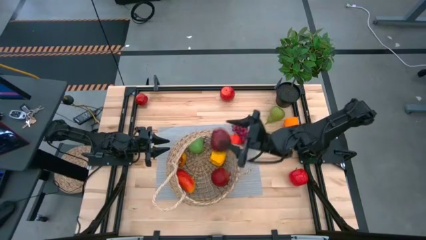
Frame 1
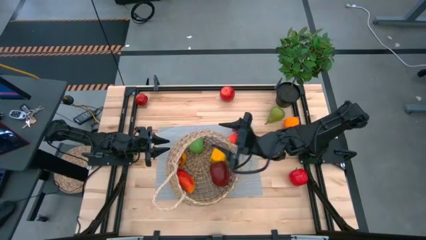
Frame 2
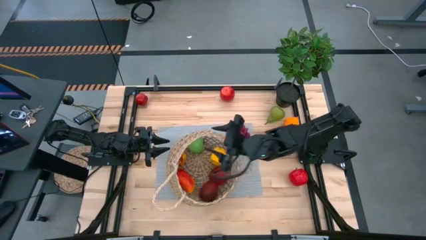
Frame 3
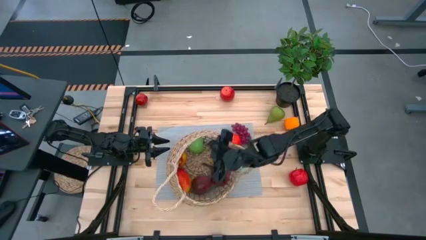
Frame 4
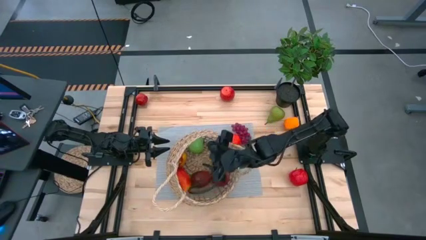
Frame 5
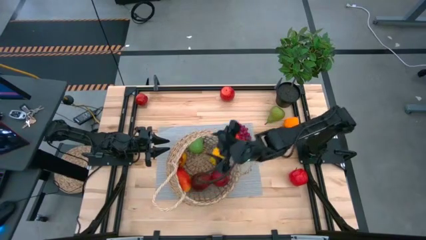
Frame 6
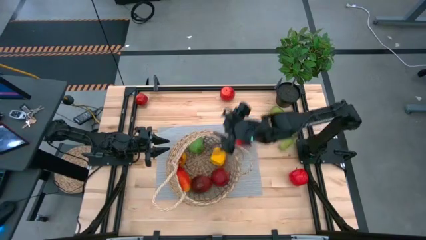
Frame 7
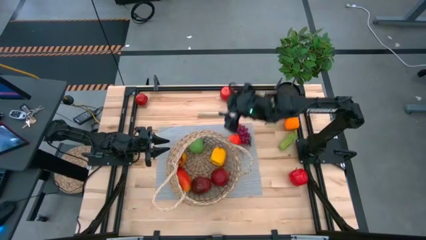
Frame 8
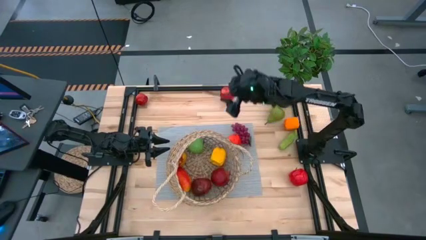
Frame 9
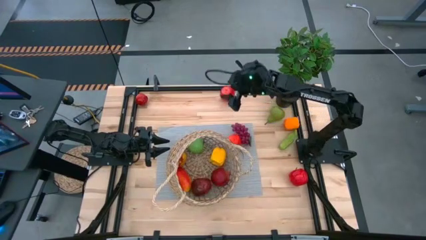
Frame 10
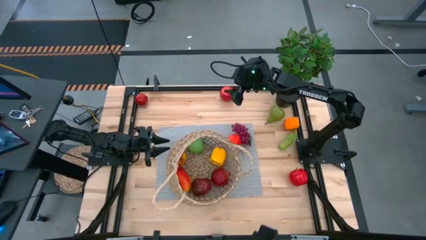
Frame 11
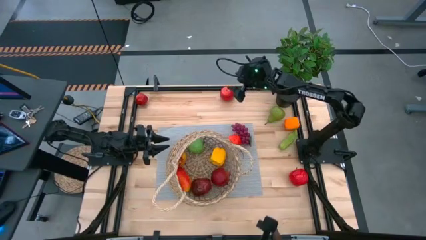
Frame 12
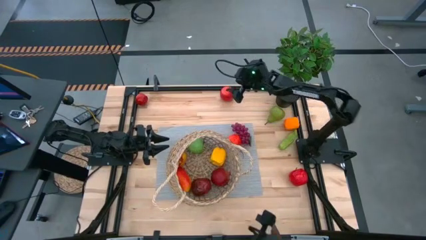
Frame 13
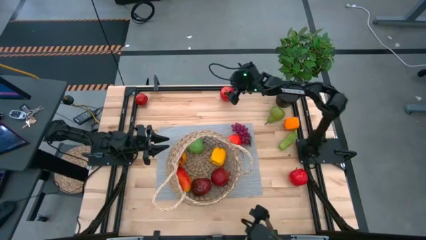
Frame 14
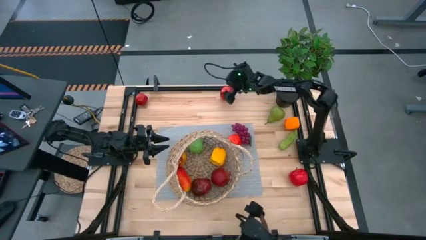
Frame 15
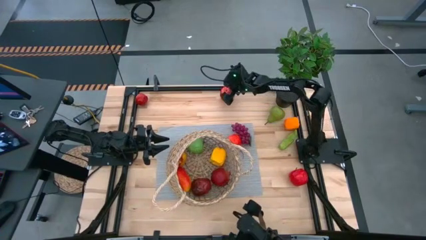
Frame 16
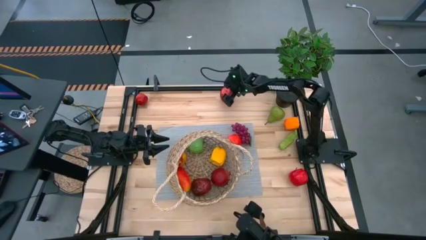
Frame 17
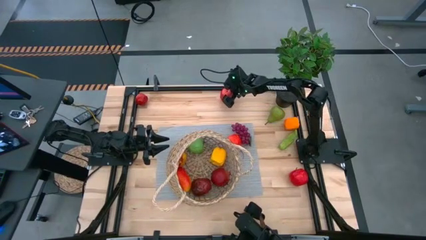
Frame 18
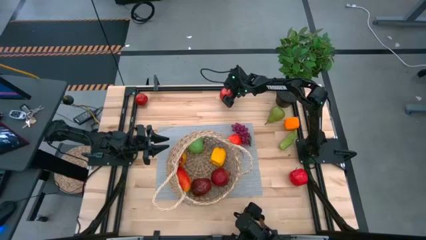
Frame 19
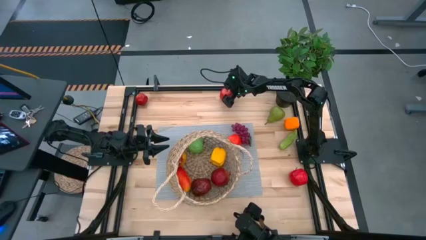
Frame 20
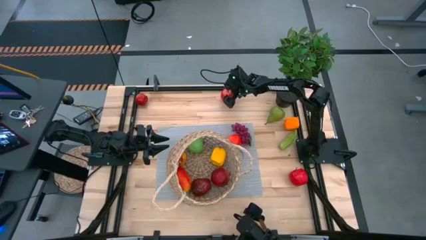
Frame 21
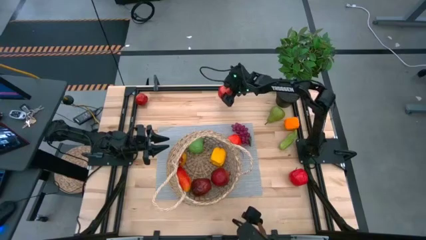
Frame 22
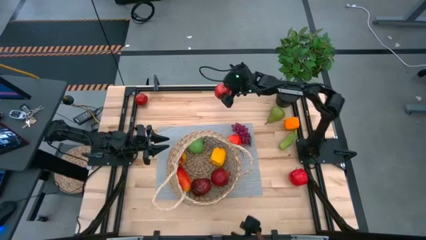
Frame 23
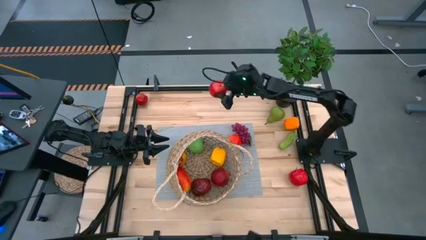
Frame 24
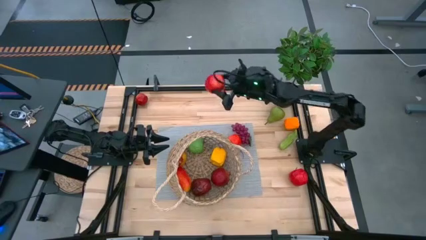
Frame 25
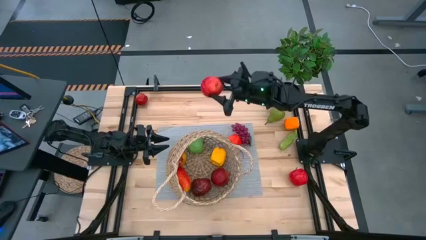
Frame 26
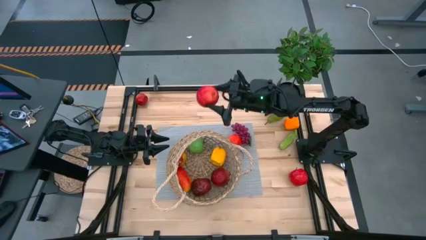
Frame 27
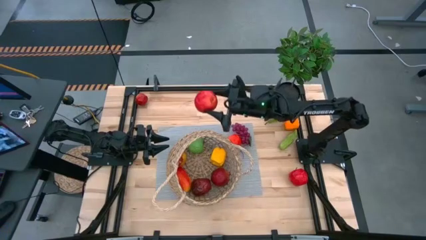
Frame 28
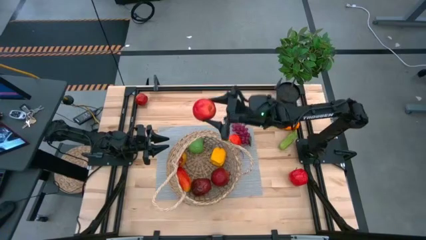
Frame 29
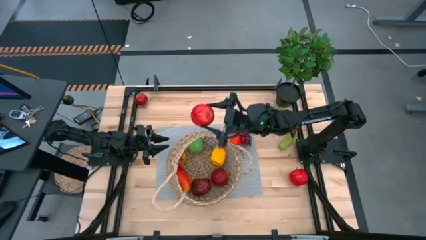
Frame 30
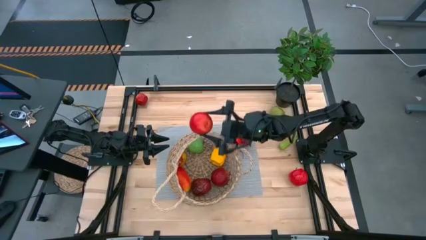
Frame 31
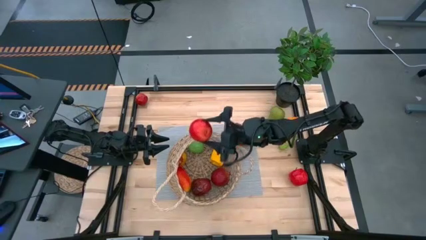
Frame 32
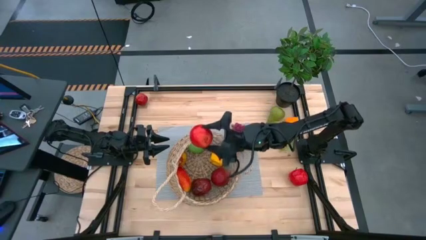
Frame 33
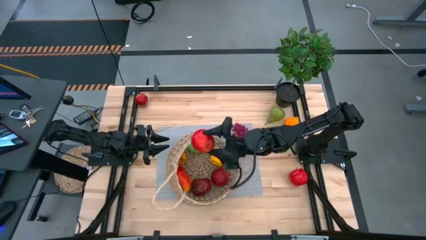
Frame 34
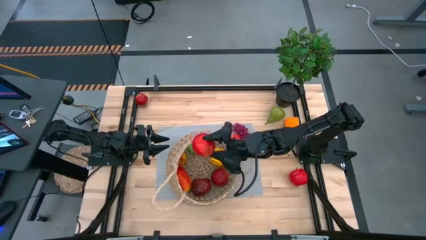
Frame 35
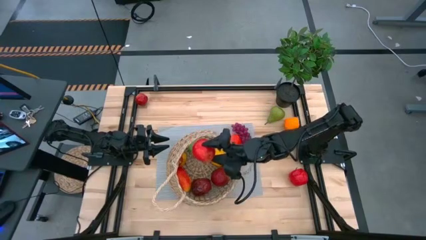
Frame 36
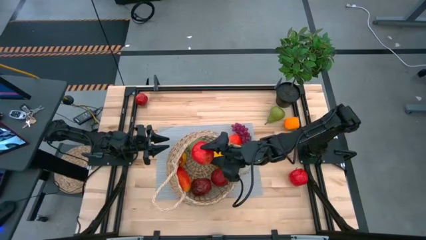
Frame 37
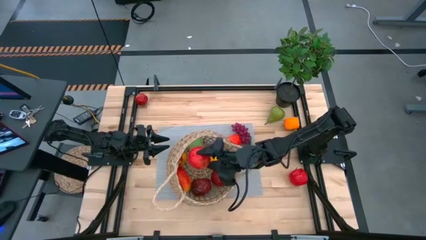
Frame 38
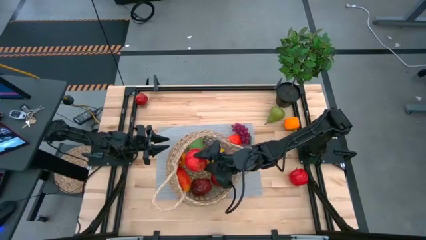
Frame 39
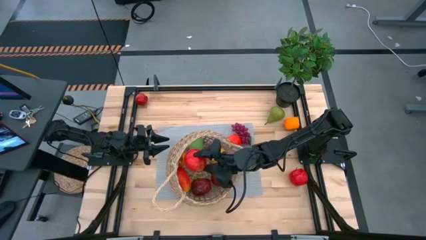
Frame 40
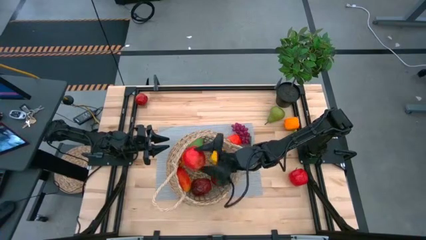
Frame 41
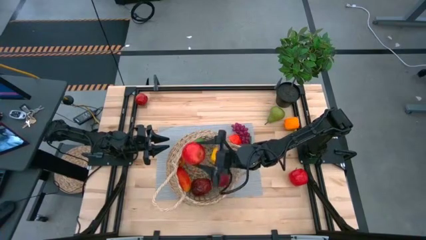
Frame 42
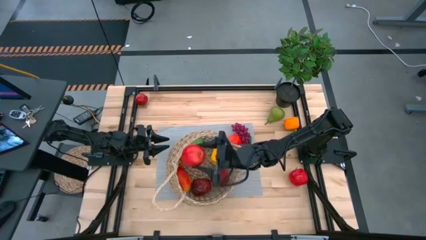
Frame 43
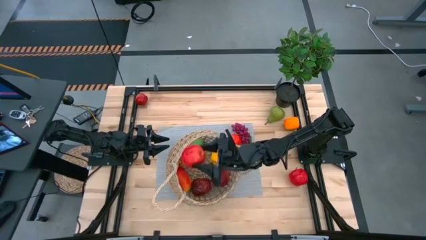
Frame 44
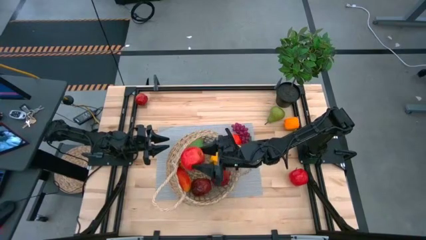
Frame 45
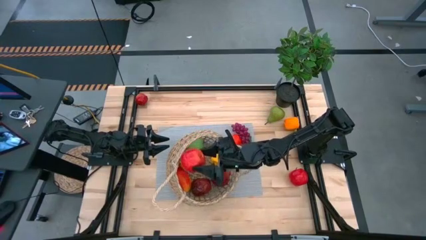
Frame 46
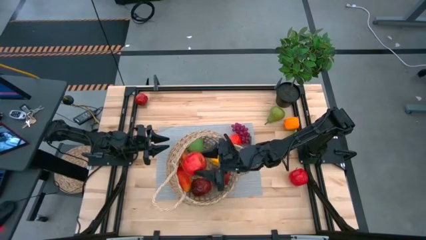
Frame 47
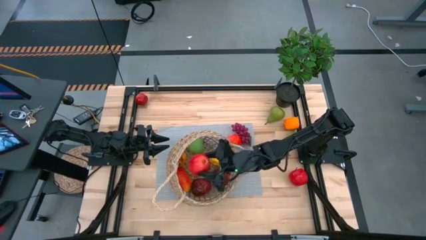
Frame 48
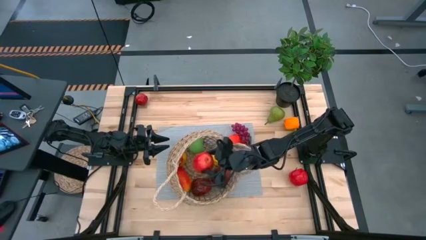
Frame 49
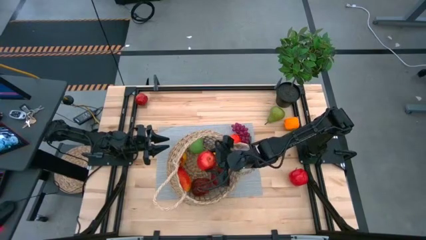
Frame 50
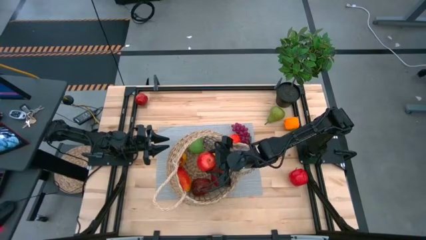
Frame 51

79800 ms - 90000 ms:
Task: Build produce basket
Put the red apple into the brown basket

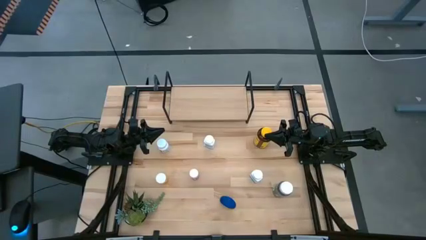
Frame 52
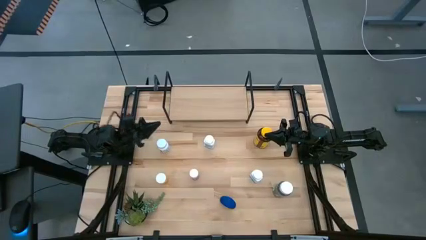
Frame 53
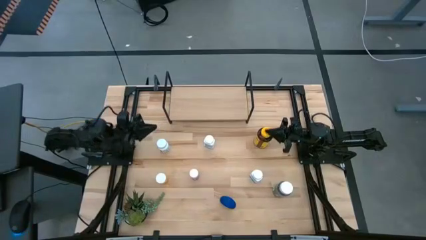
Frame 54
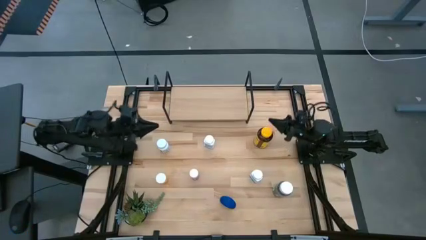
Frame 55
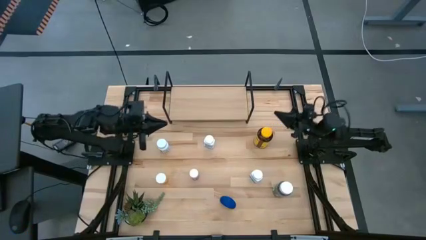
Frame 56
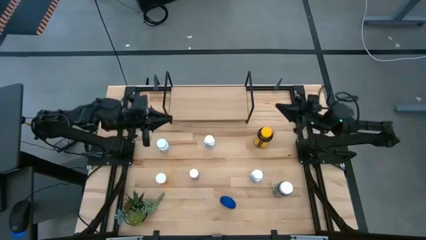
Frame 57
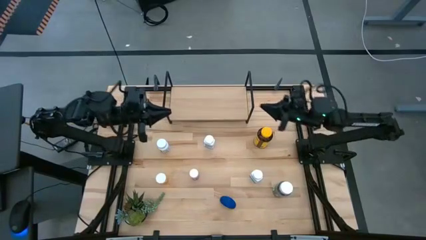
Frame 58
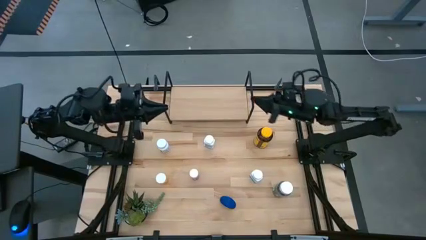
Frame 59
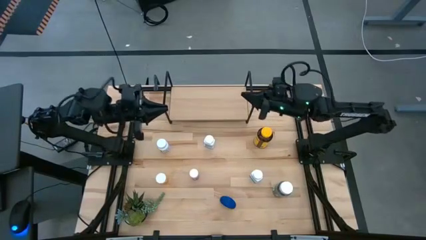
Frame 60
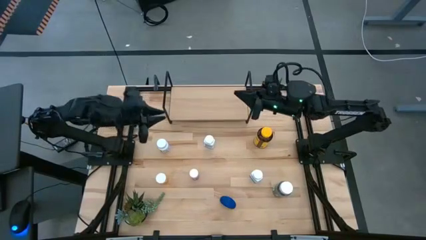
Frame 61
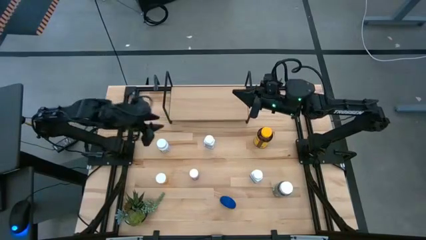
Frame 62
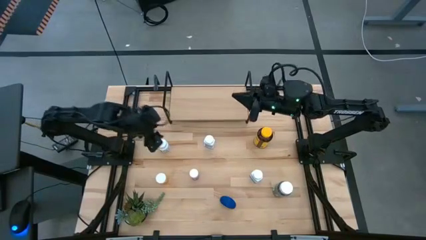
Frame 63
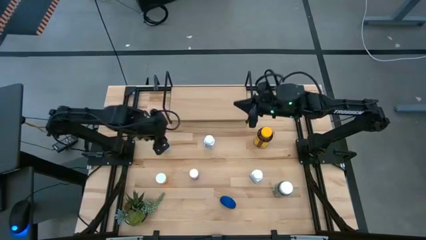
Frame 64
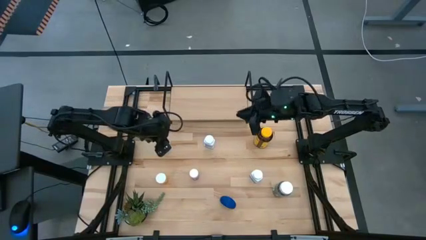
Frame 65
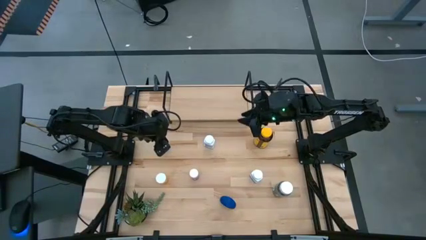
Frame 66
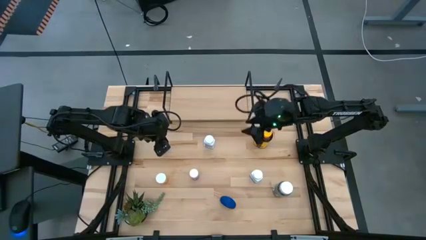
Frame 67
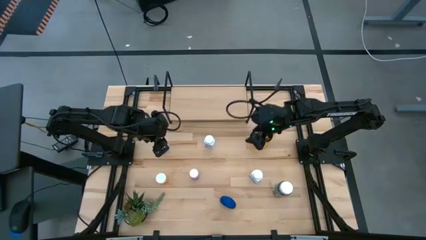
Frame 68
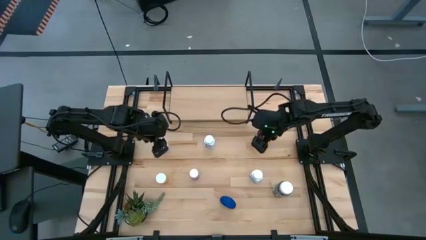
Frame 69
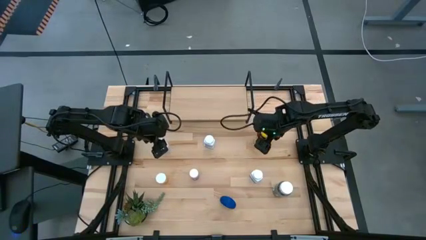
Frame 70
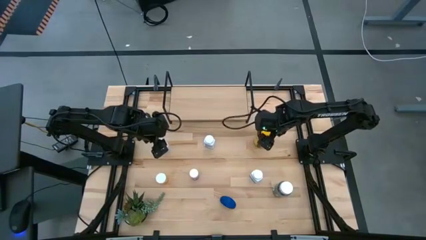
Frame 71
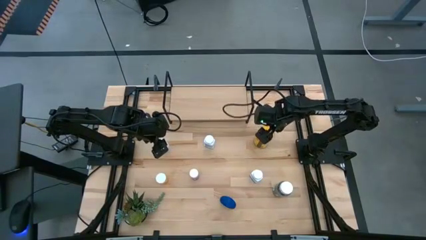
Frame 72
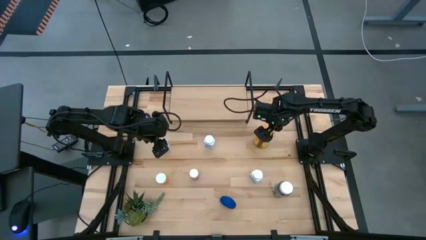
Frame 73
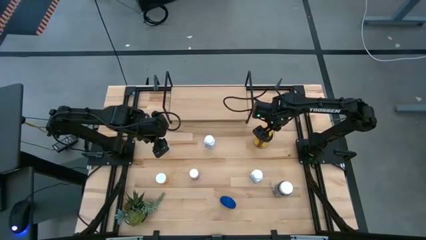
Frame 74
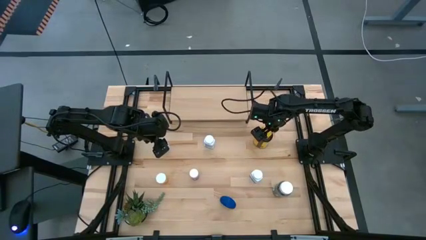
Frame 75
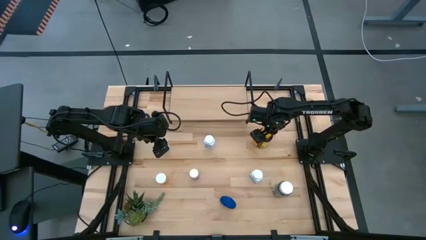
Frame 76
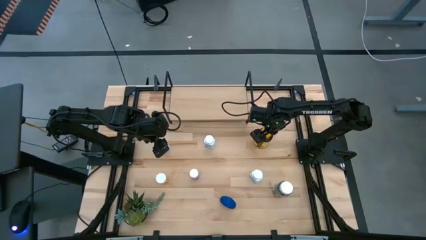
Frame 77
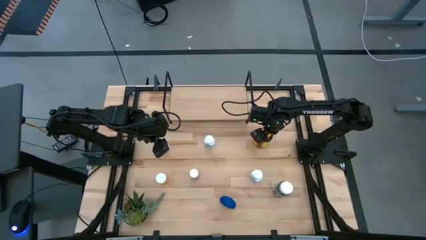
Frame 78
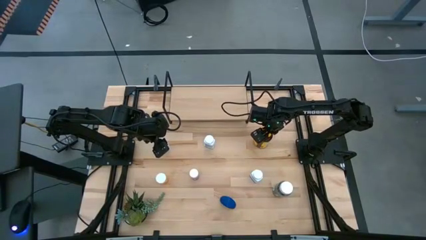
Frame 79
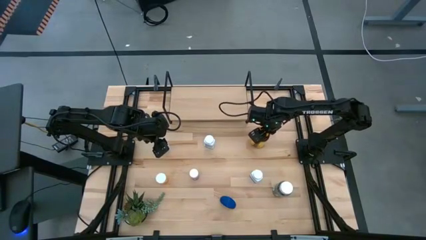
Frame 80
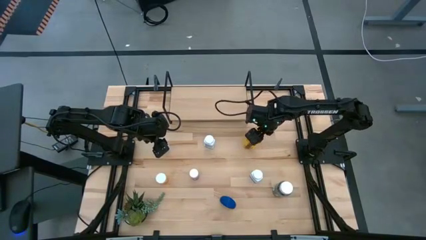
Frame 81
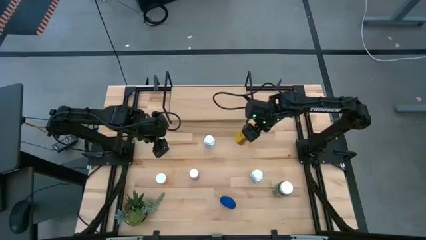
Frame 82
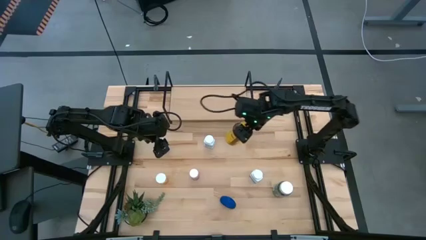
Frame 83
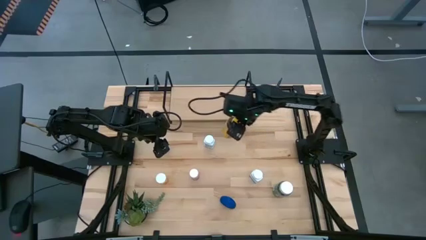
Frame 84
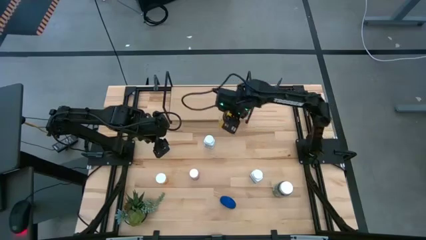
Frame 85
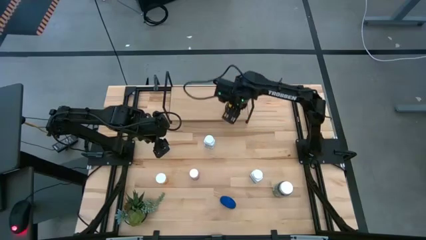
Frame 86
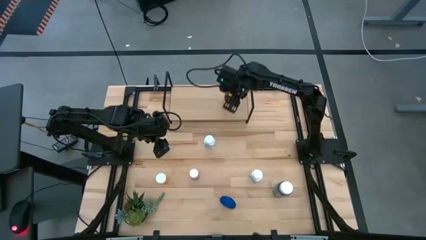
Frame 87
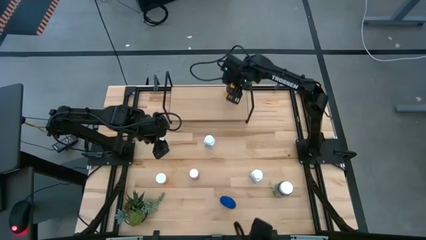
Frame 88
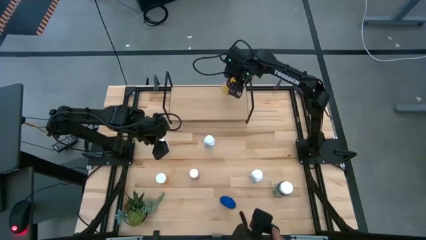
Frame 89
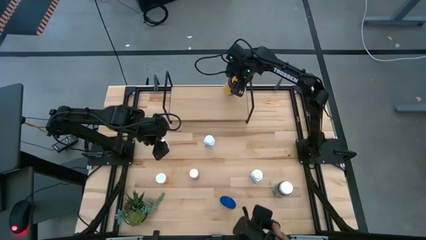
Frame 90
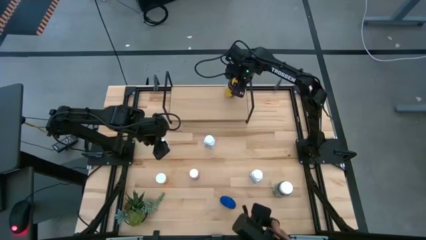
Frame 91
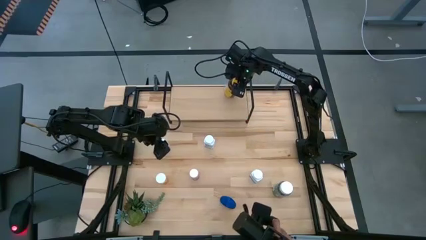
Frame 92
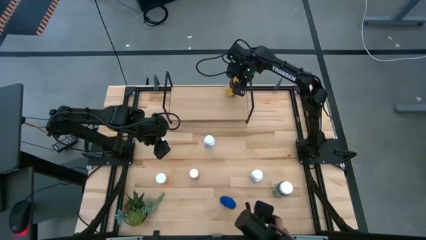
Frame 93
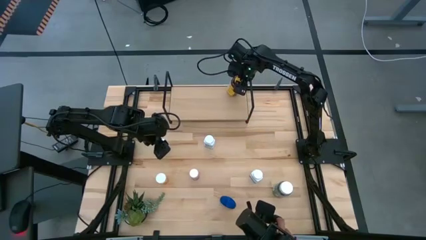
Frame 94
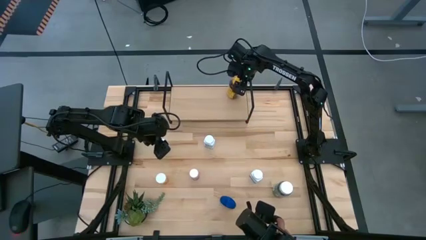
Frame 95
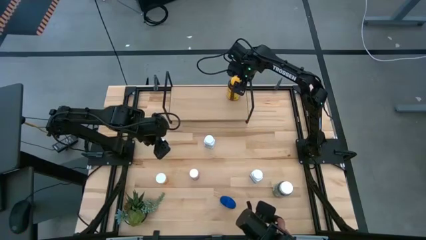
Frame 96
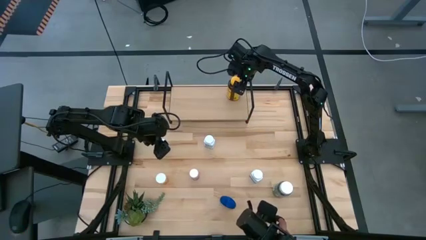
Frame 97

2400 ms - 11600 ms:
Task: Pick and place medicine bottles onto shelf by color
Put the brown yellow pill bottle on the shelf
